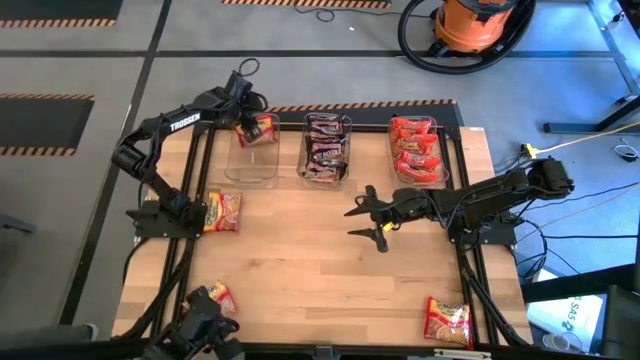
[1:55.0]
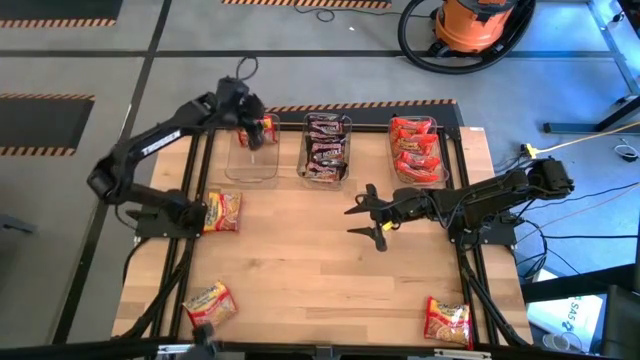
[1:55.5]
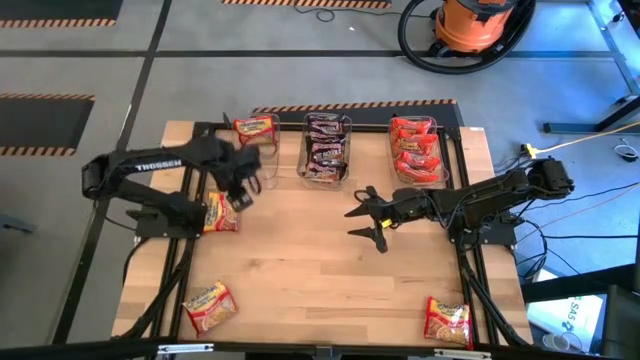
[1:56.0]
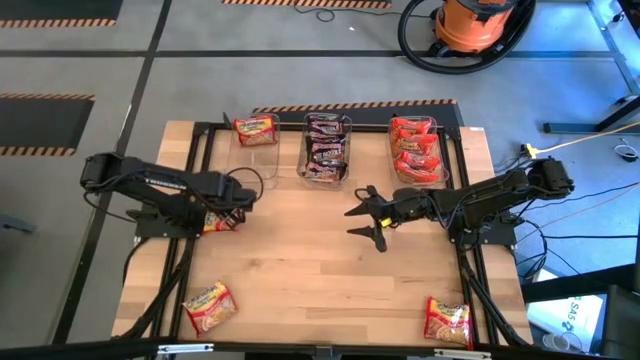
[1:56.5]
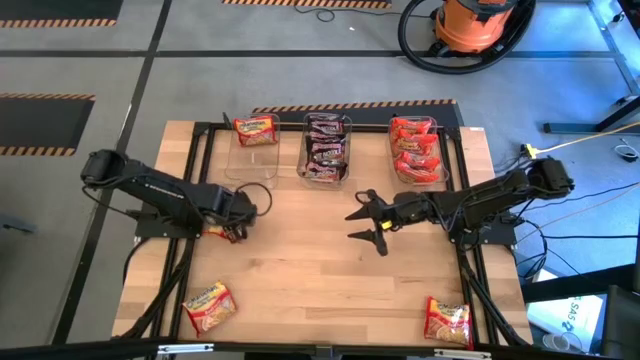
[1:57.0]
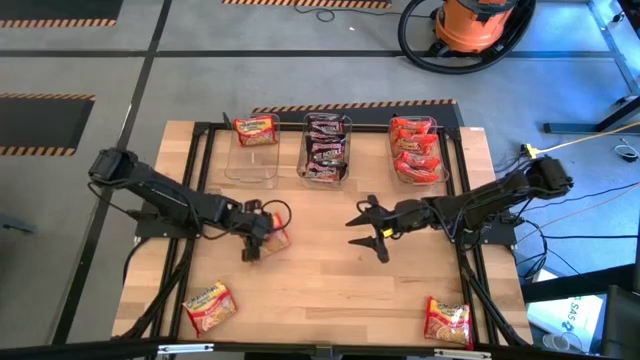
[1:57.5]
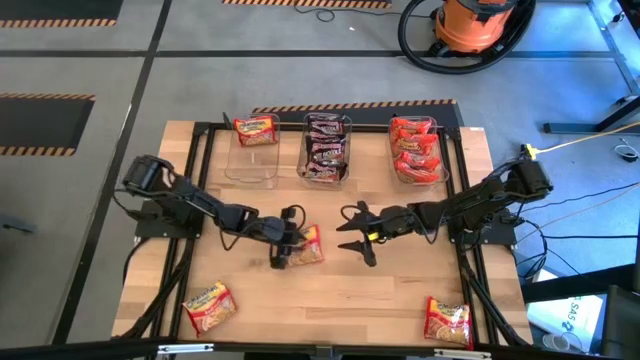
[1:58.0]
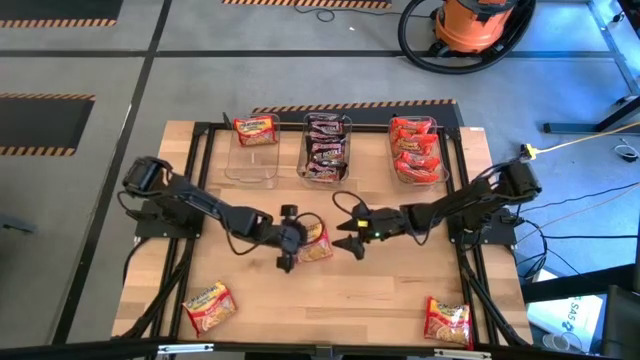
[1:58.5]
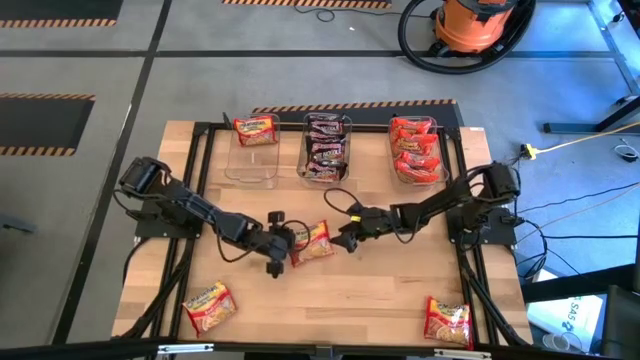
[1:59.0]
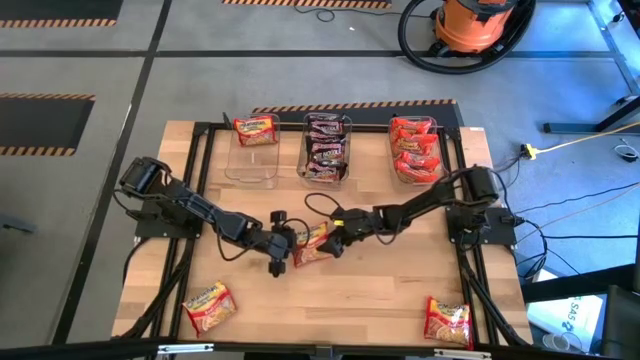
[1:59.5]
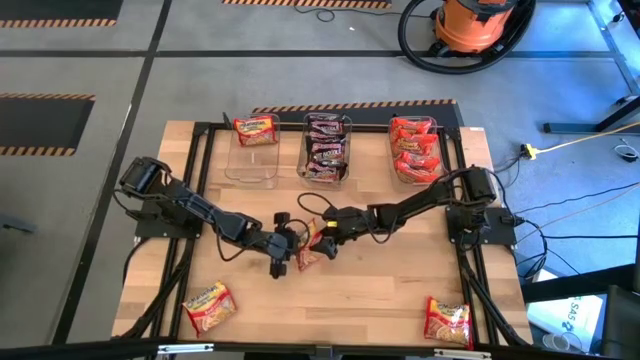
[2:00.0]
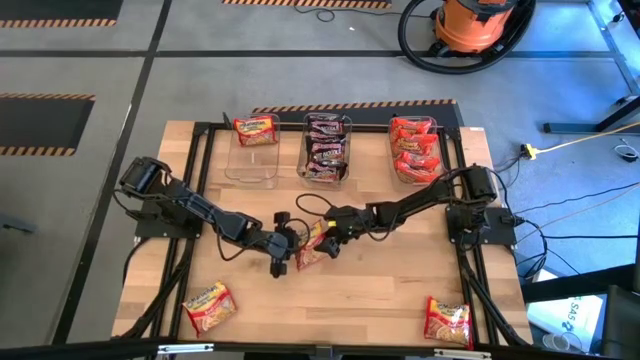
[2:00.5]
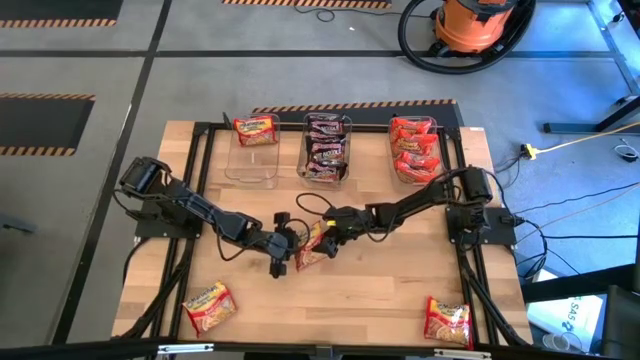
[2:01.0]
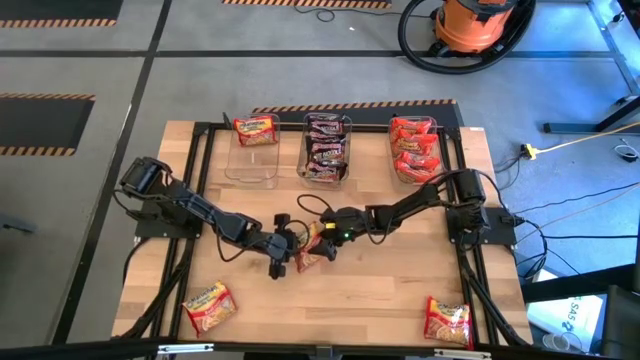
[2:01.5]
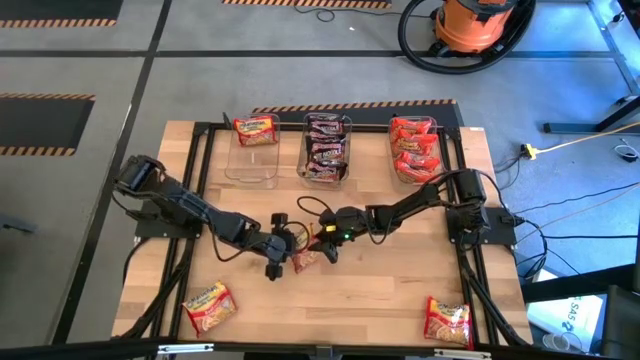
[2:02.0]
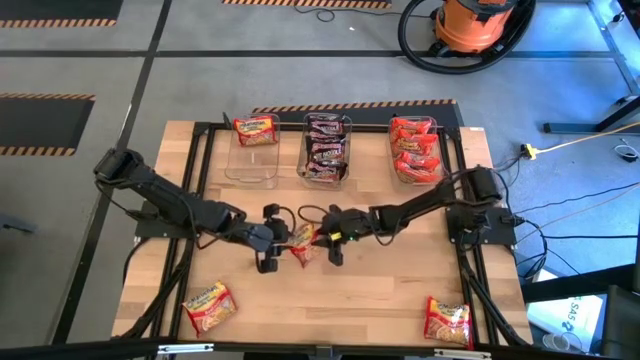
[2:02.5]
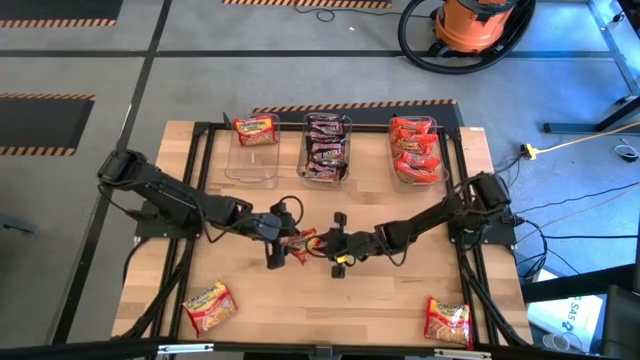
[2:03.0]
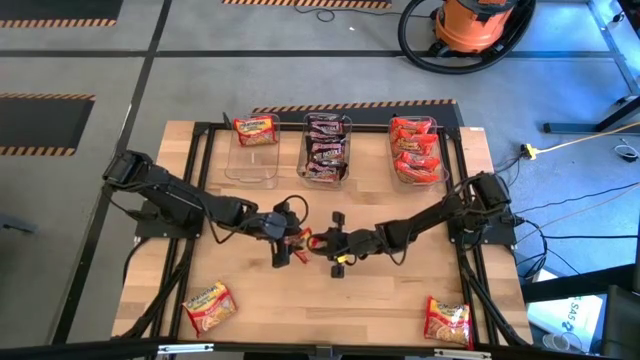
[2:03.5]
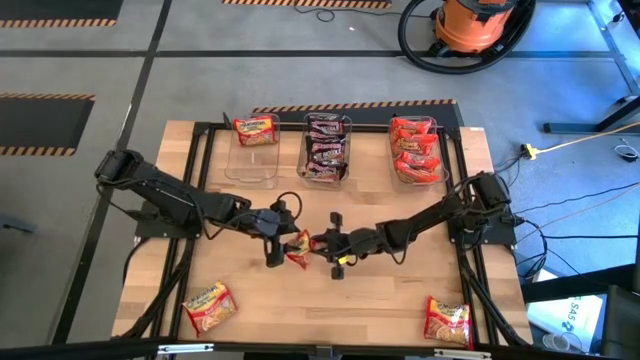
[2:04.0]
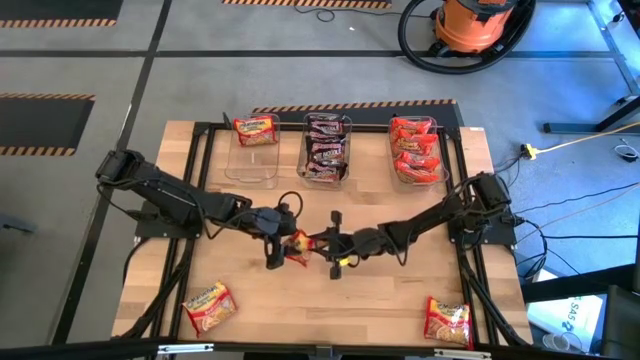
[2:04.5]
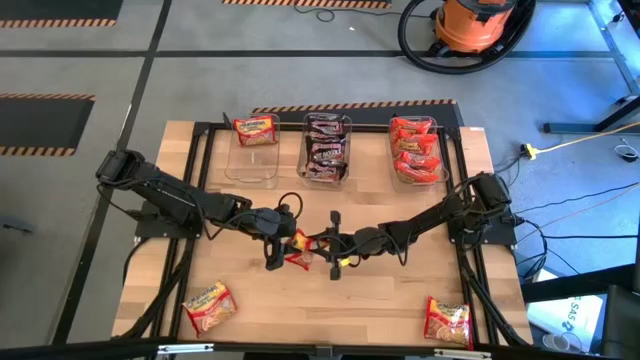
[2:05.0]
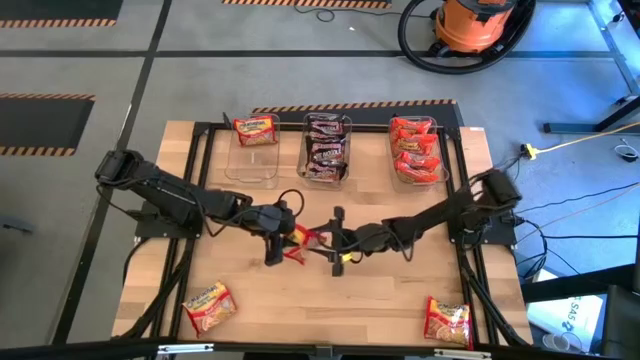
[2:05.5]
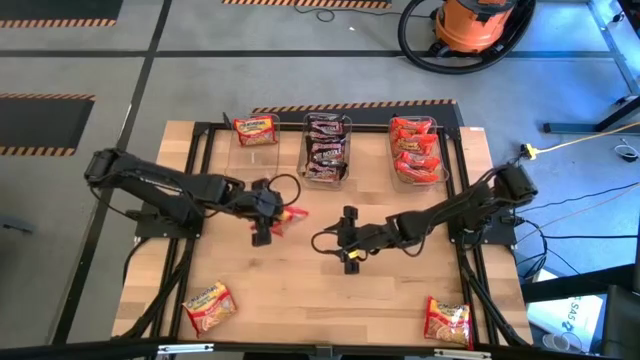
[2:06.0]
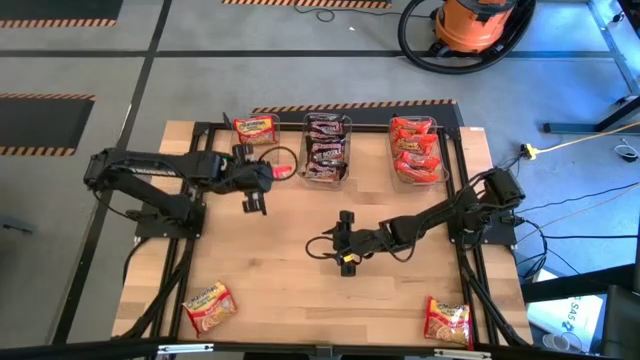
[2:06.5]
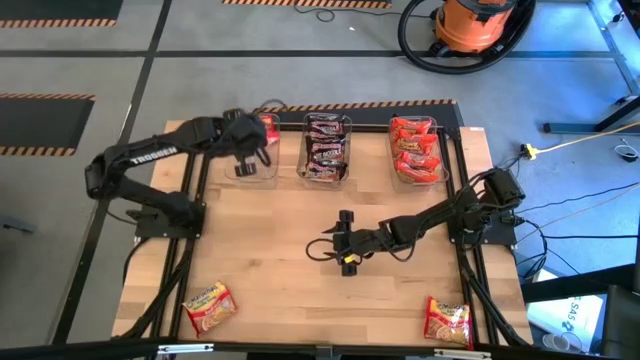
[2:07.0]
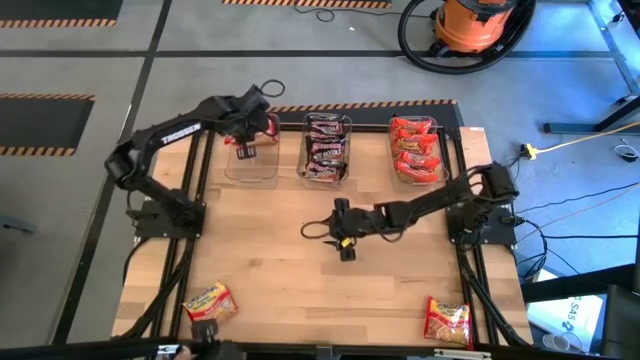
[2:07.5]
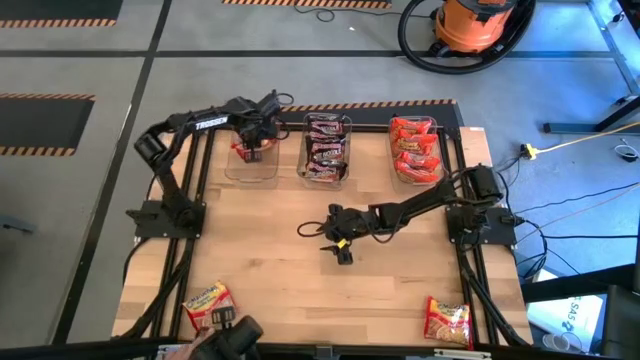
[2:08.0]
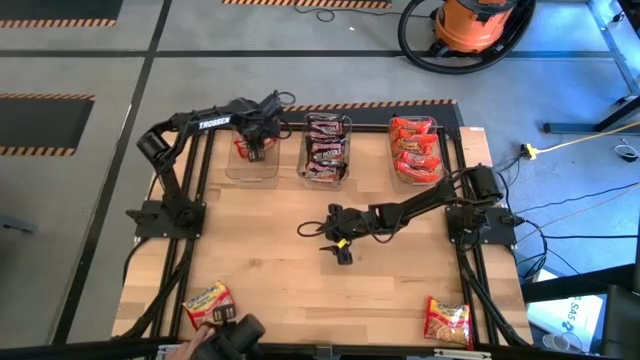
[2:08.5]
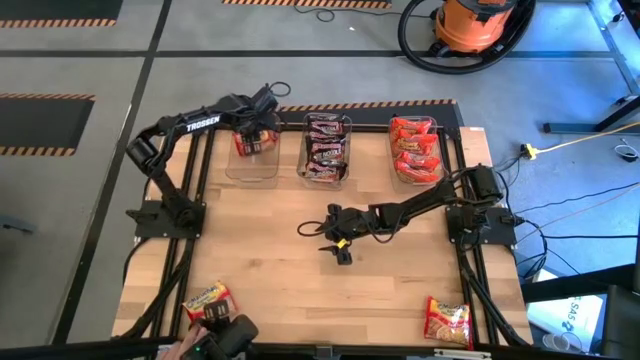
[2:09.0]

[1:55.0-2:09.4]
Task: Sort Maruchan noodles
Put the red noodle pack into the left transparent bin

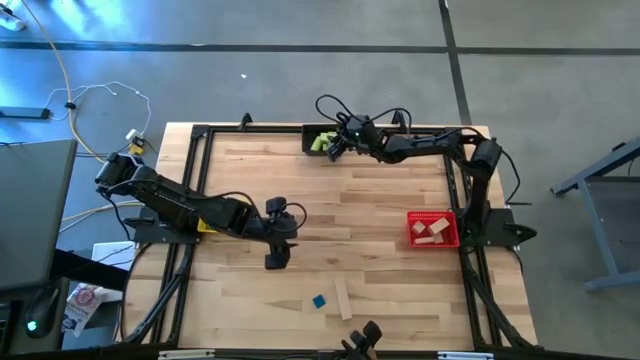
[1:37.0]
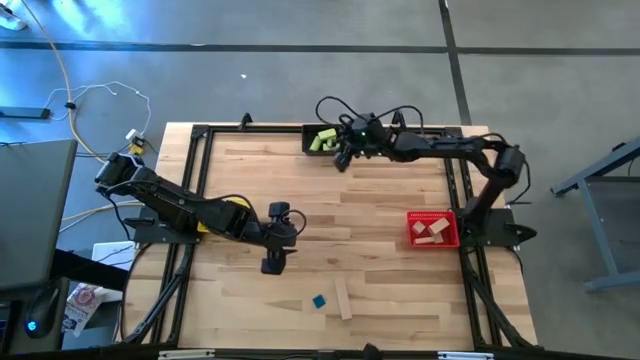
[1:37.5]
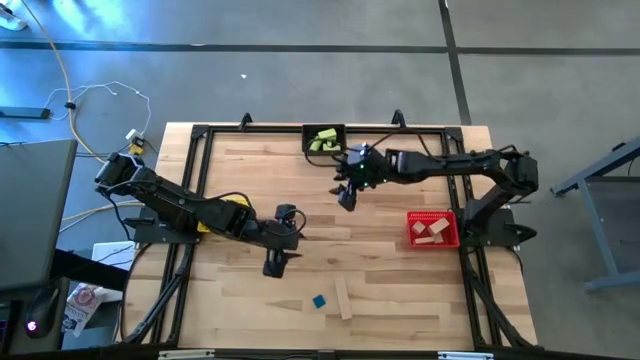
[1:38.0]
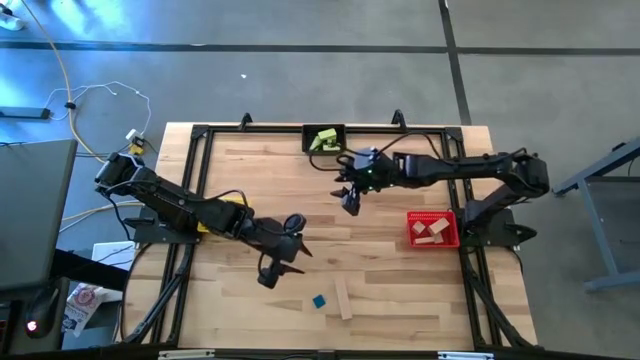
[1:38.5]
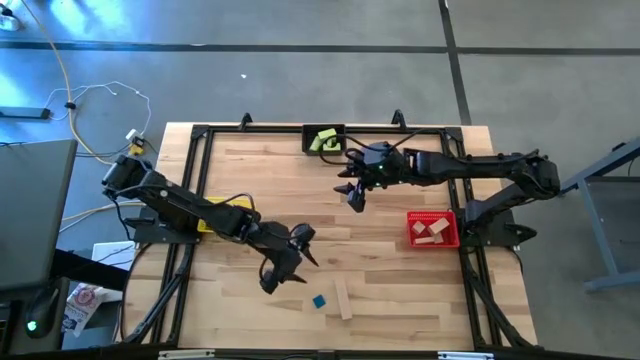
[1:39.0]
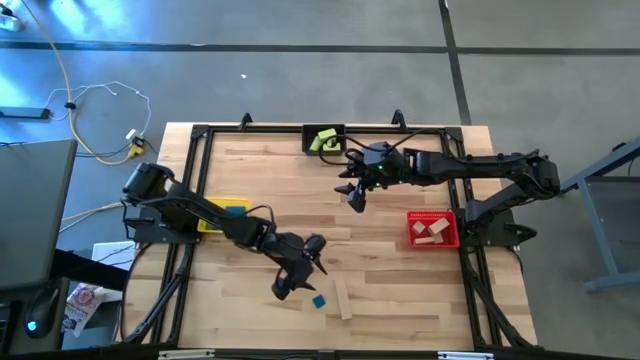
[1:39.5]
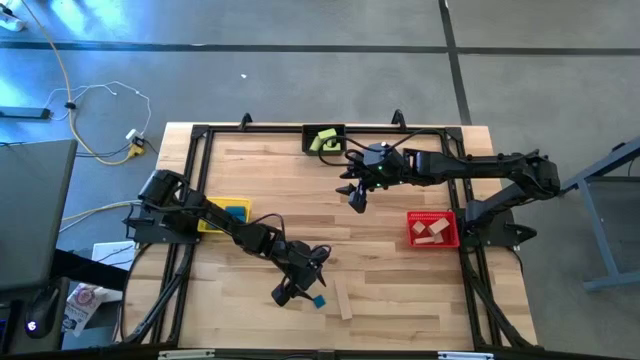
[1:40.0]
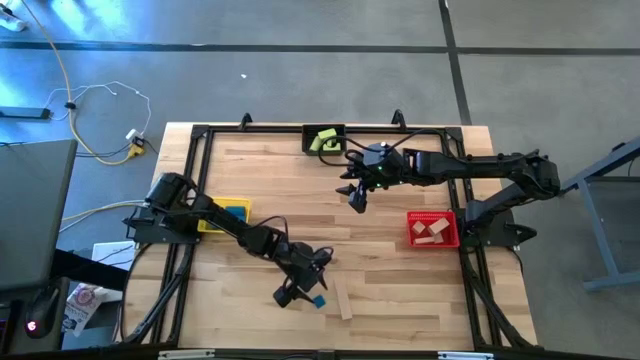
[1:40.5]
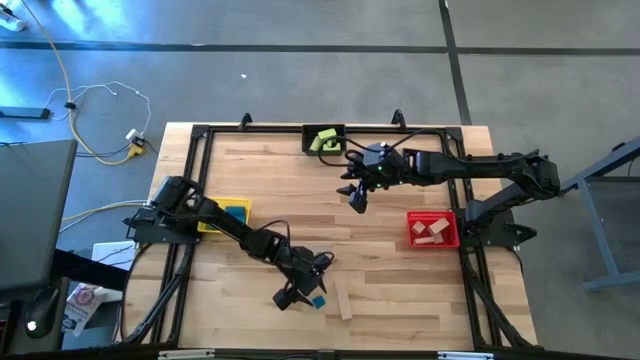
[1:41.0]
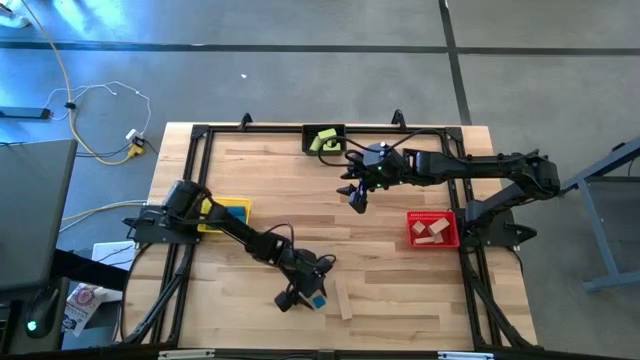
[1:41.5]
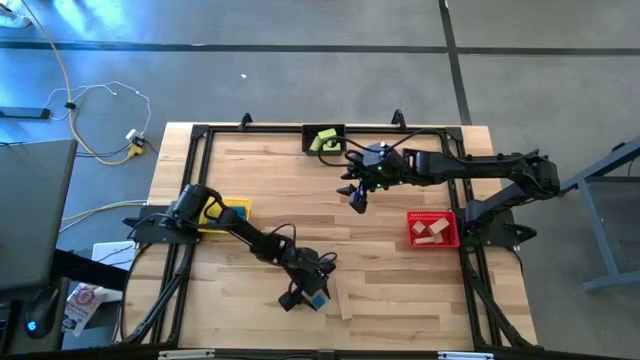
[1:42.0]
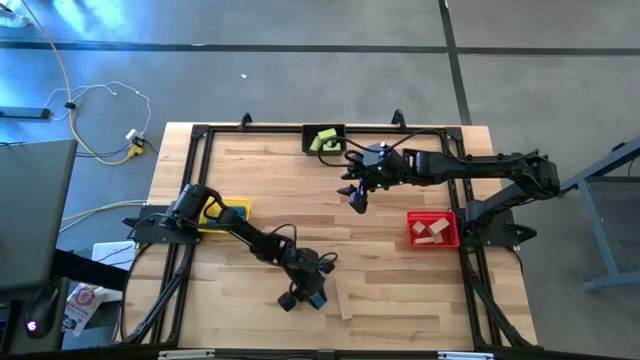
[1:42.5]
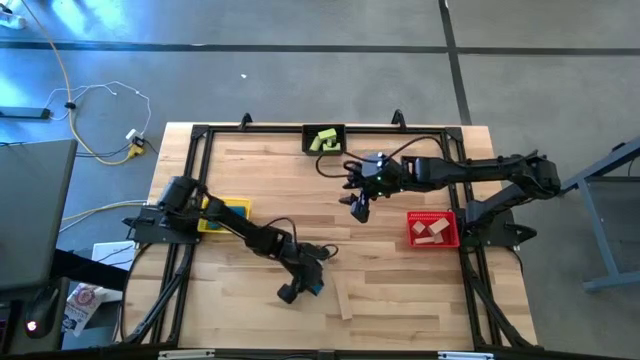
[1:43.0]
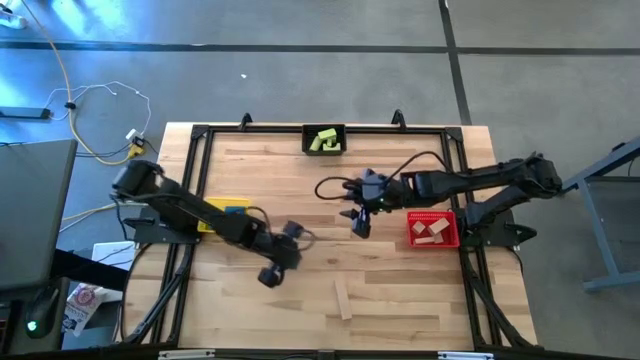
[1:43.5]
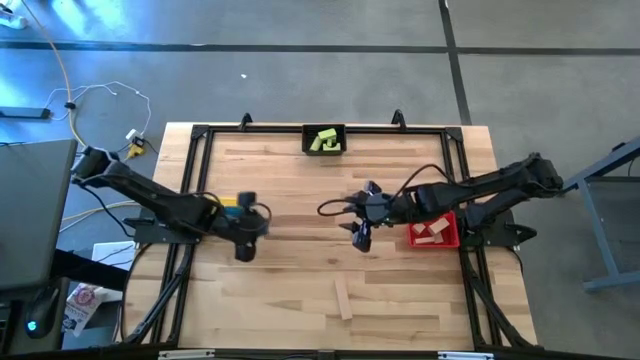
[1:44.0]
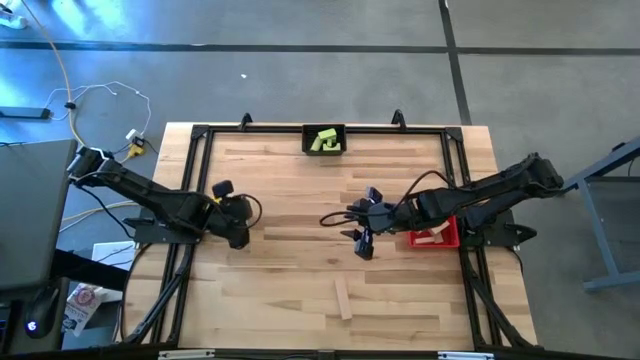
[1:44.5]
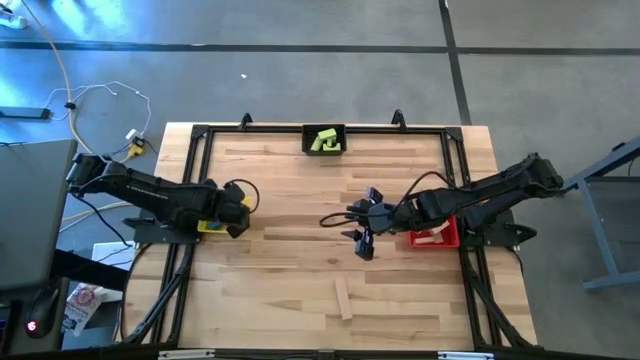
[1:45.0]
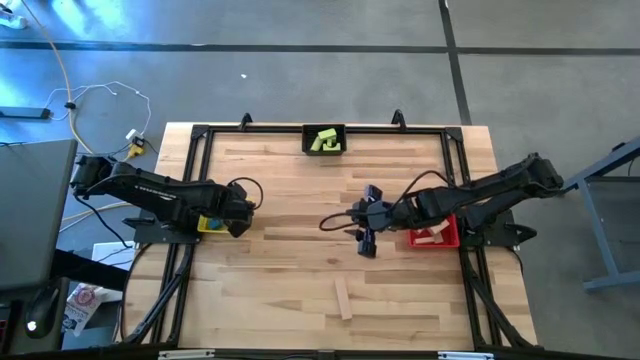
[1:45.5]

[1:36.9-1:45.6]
Task: Sort & place blocks by color
Put the blue block into the yellow bin
